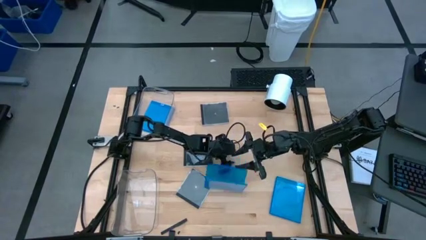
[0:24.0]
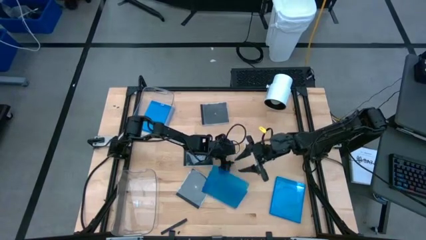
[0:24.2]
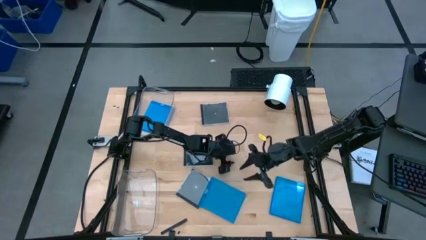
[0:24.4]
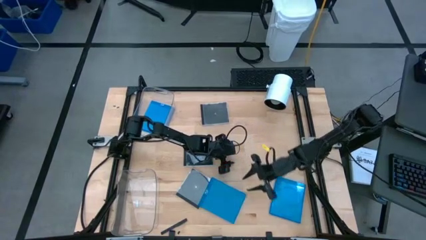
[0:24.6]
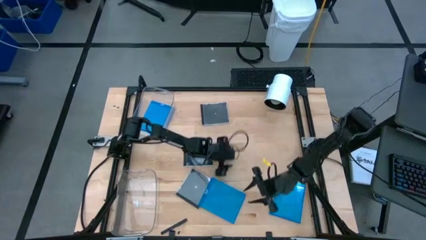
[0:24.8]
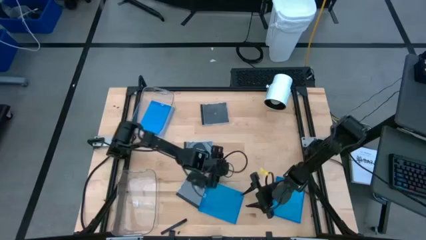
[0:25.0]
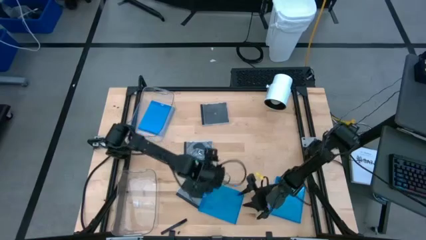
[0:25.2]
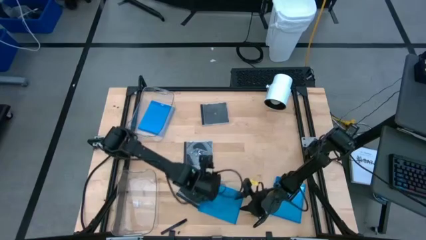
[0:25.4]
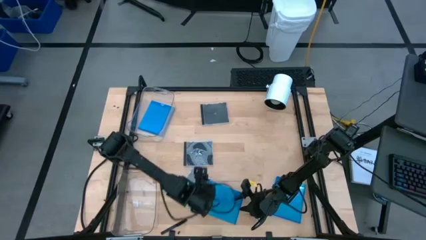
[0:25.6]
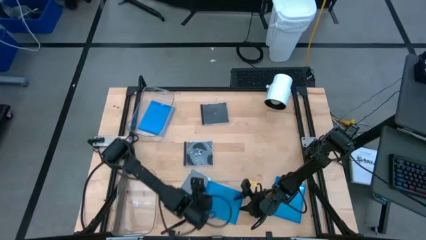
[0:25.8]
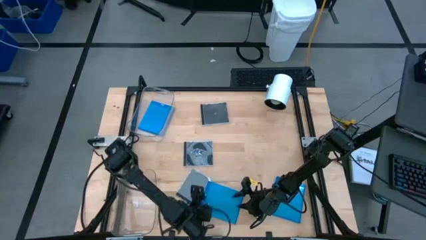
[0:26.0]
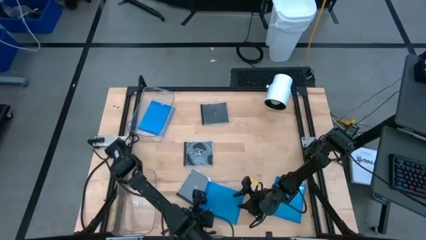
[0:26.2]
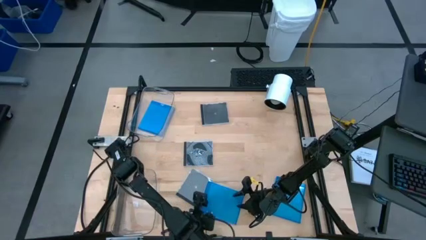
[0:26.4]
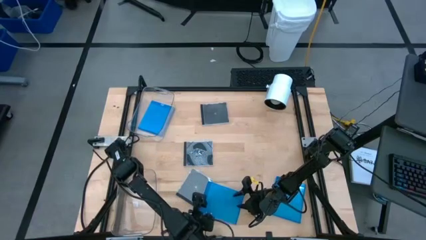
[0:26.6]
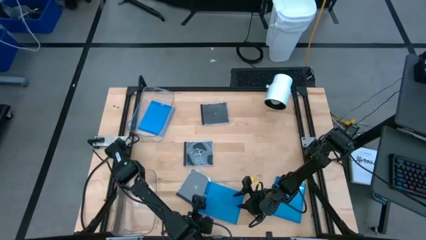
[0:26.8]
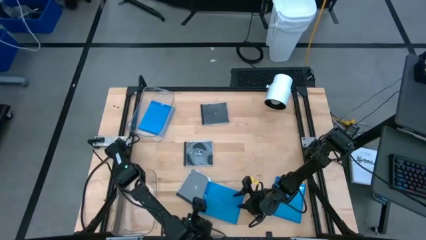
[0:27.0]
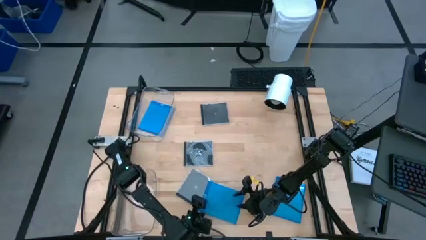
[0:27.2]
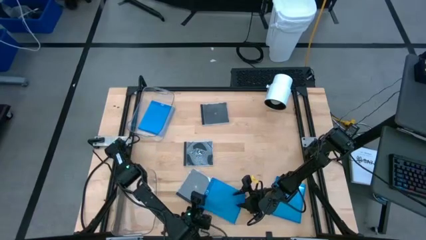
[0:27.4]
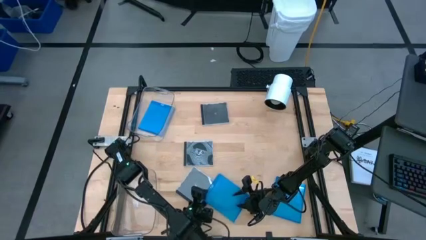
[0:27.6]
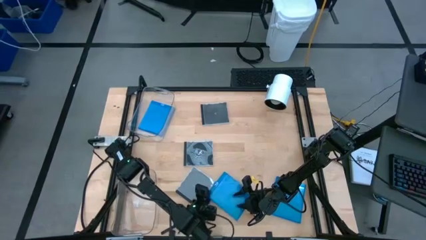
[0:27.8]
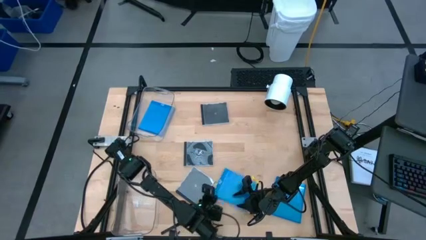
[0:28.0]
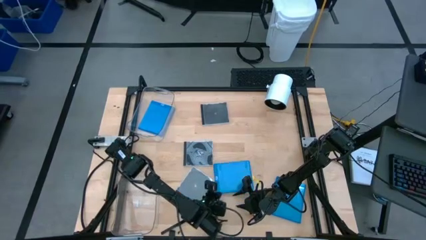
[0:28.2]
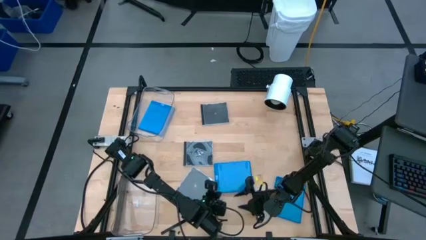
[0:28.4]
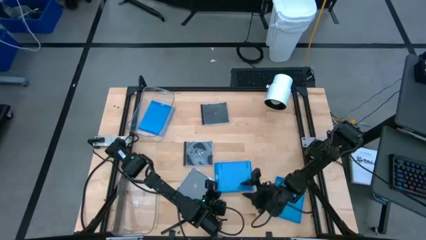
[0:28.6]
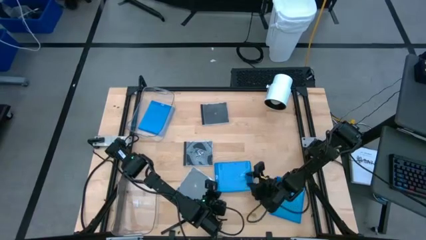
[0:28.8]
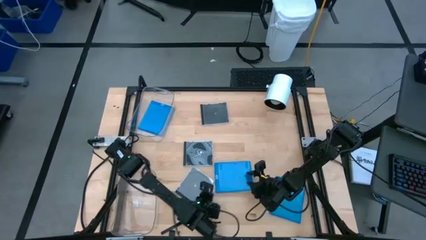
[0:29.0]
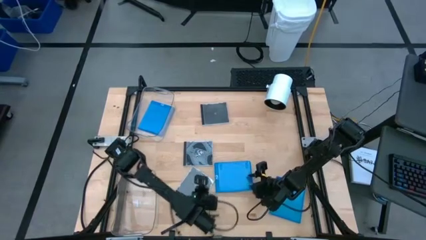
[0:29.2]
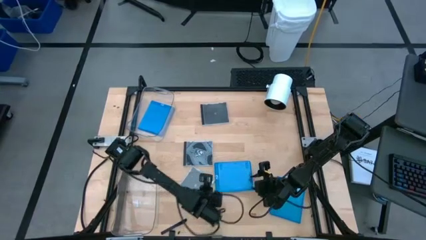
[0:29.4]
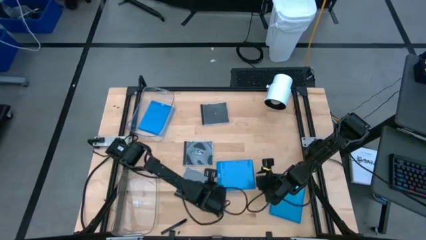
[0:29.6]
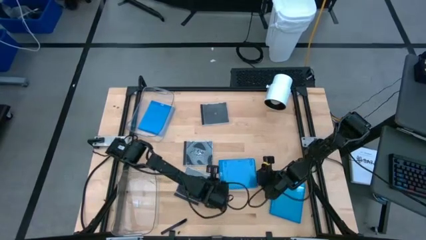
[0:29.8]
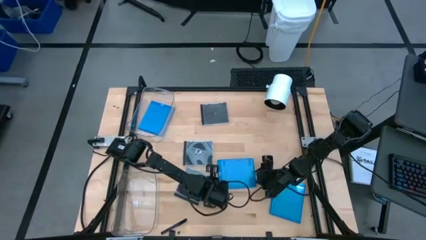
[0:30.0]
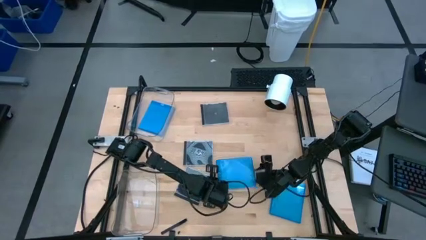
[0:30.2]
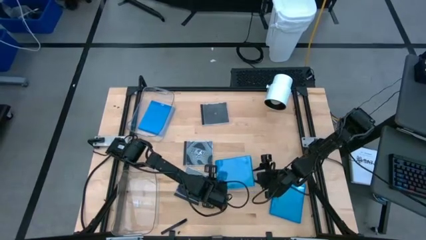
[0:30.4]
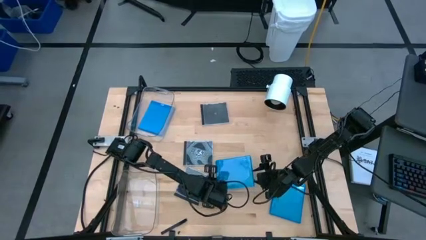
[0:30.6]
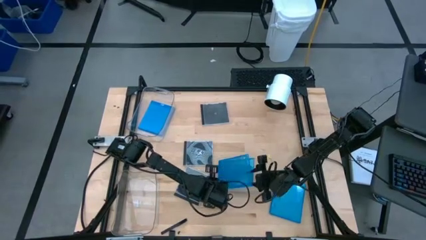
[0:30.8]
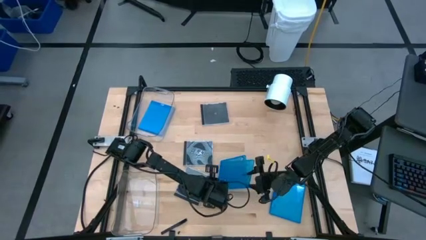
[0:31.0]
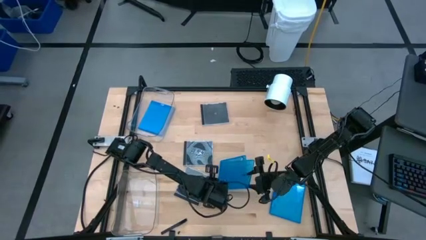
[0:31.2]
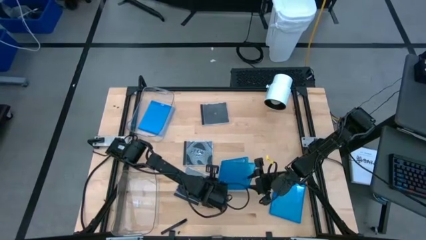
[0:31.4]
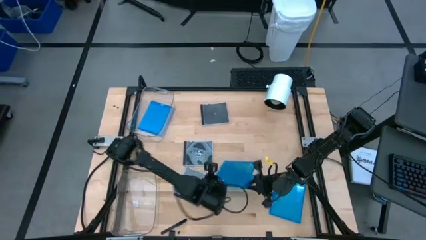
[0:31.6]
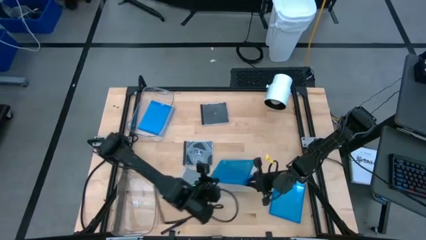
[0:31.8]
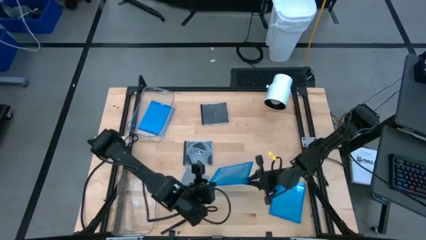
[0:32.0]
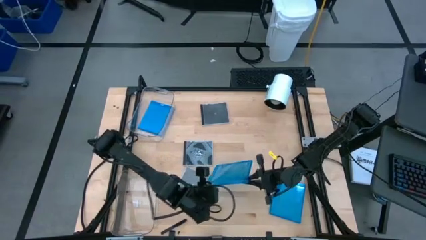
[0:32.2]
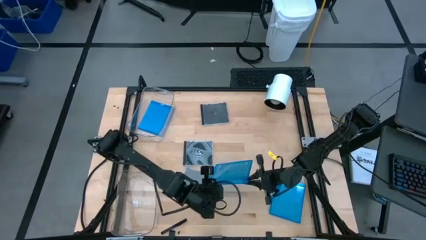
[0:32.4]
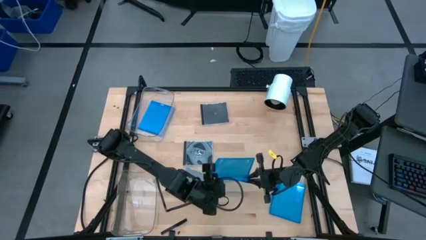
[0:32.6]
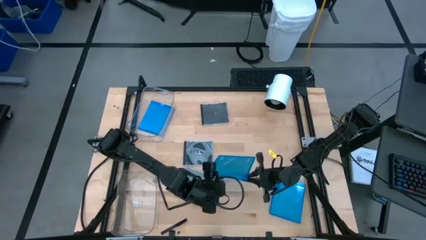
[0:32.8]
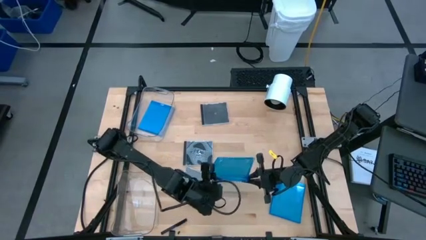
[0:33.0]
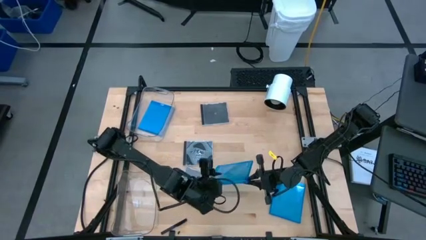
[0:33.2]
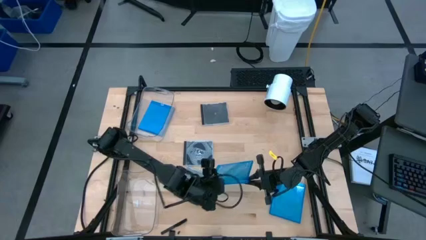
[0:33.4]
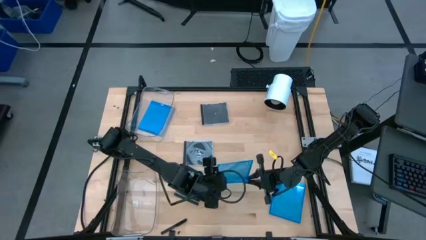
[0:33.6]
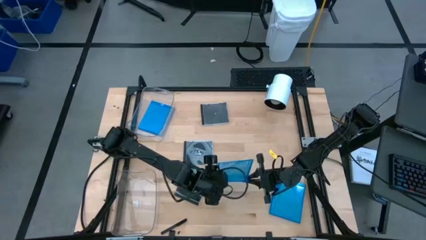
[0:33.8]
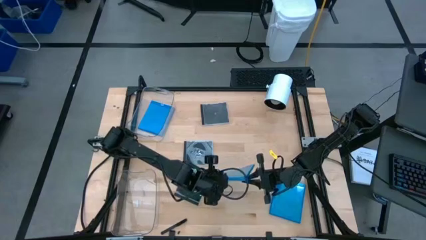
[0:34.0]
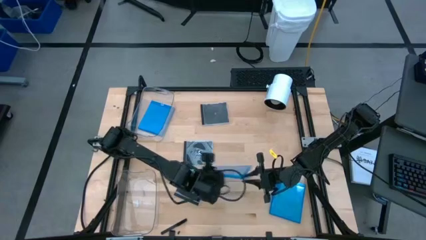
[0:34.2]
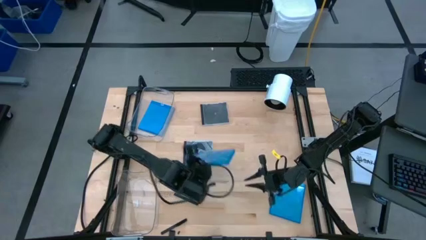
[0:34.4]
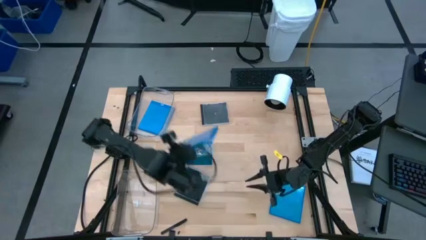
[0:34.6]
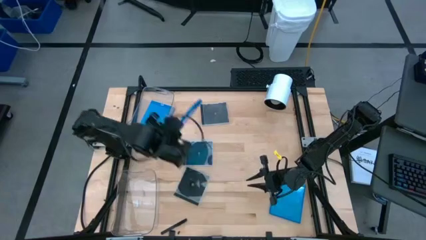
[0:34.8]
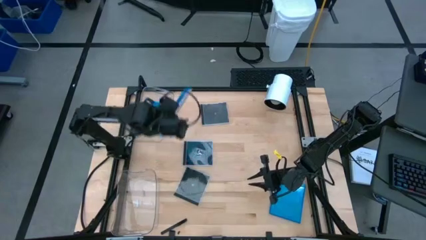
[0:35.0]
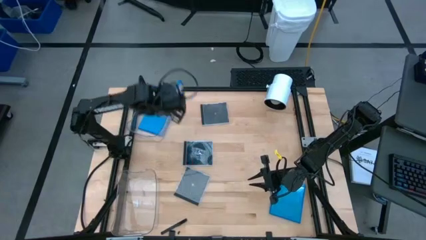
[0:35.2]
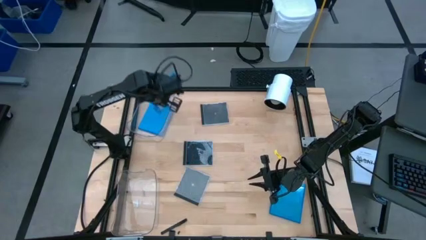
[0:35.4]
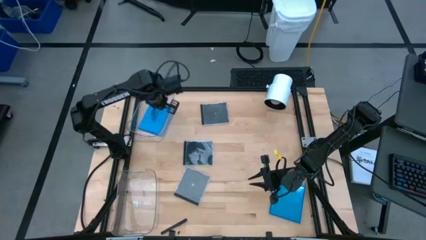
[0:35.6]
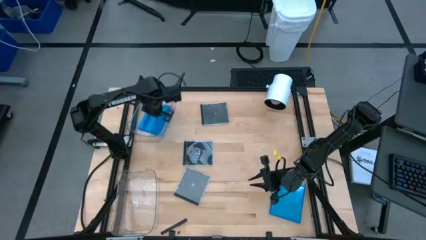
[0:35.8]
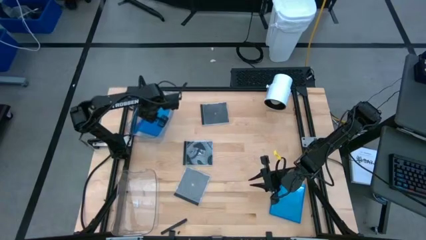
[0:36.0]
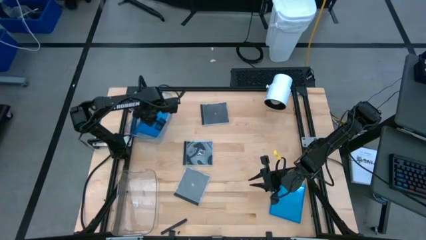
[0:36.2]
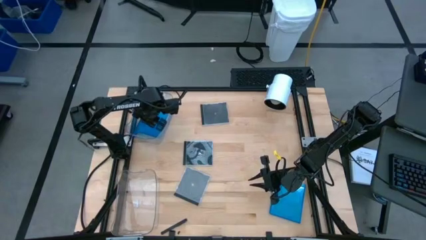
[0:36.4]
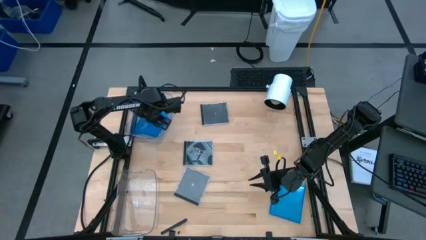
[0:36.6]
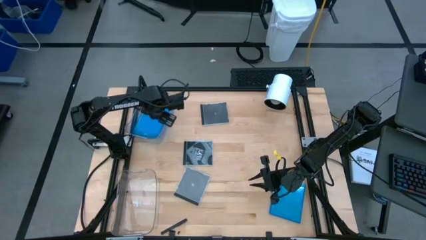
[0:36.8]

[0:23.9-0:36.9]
Task: Pick & place jewel cases by type
Put the top blue CD case into the top transparent bin

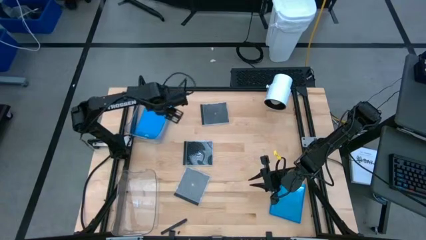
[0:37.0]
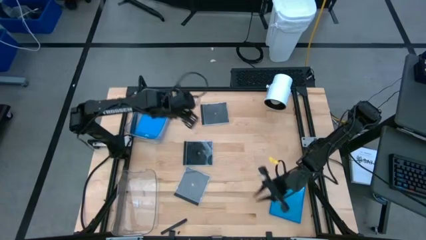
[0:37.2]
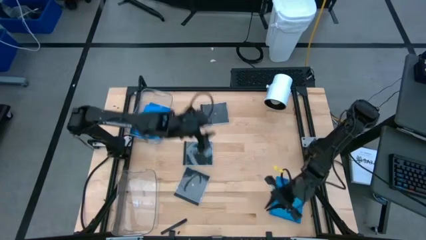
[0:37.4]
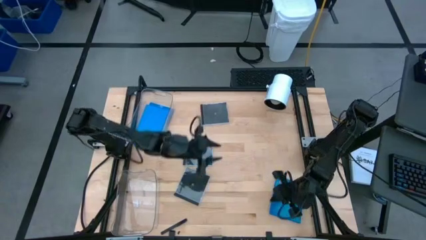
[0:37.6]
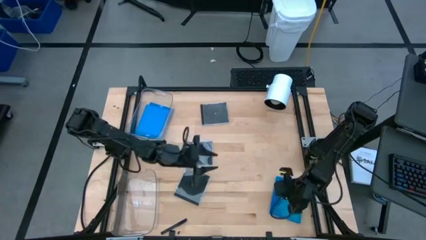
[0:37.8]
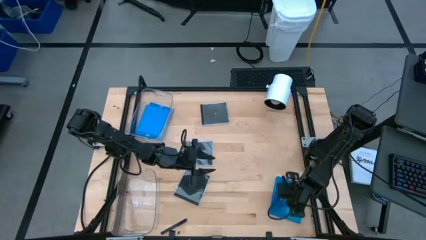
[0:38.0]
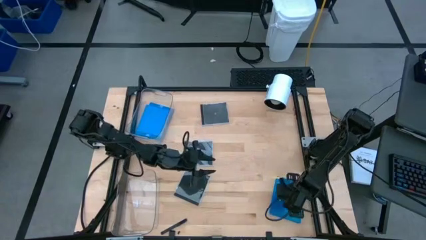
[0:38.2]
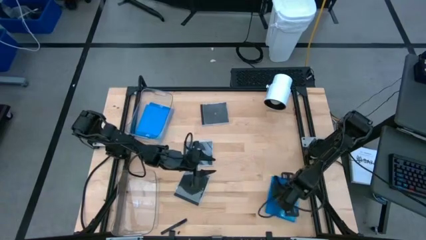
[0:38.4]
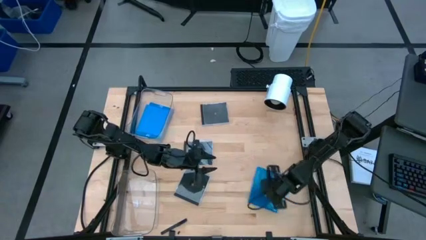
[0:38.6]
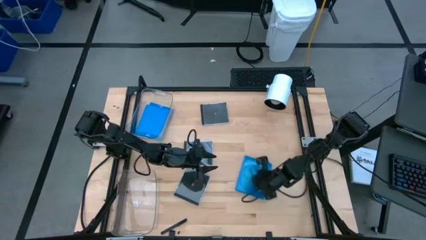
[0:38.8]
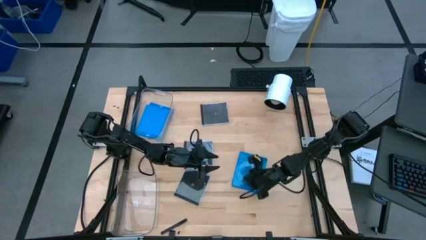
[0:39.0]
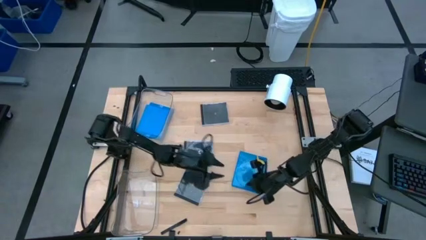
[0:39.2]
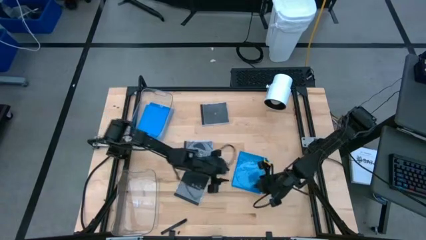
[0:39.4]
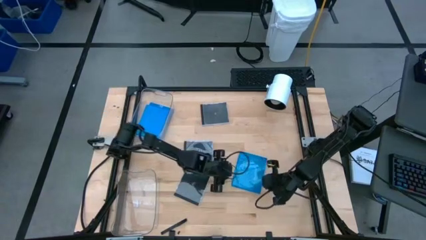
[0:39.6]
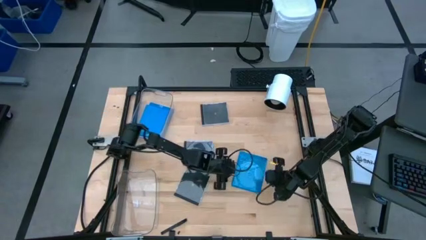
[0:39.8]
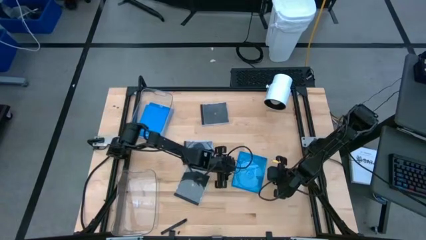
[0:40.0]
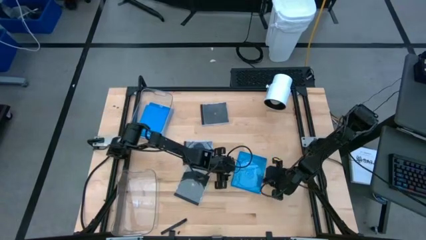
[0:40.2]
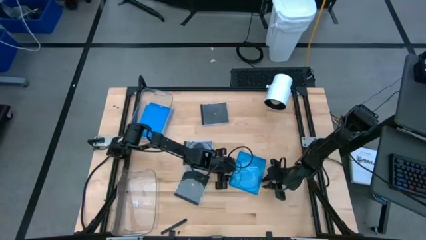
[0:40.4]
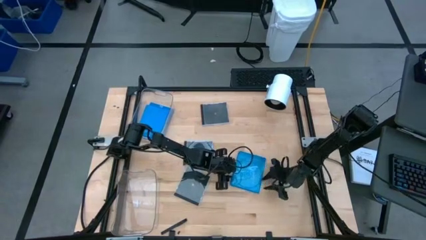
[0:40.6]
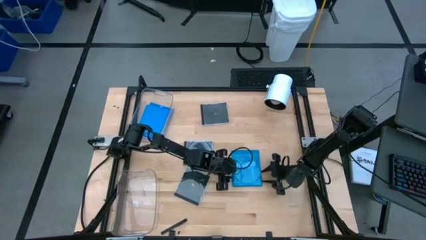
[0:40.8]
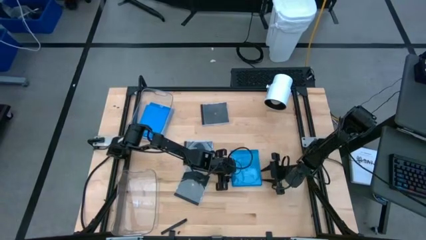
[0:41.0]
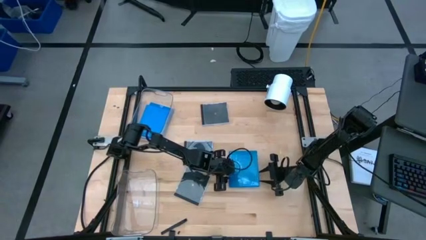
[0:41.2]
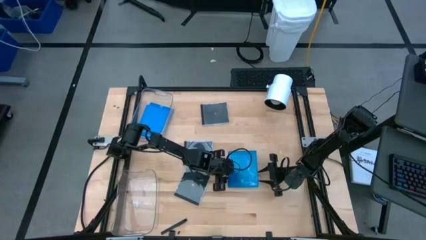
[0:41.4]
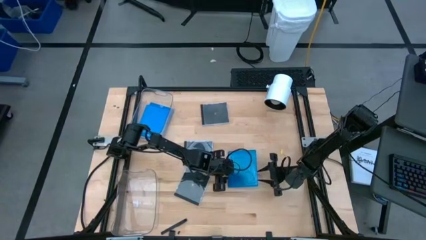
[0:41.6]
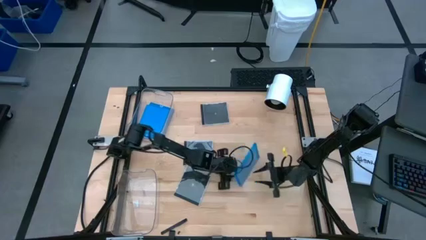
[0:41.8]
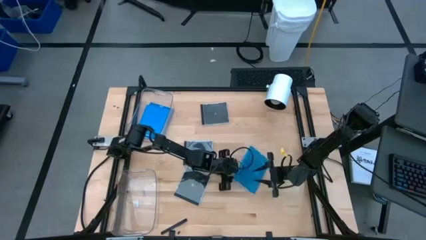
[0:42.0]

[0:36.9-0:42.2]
Put the blue CD case into the top transparent bin
